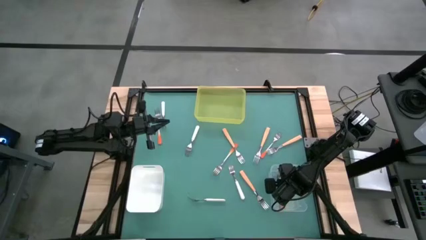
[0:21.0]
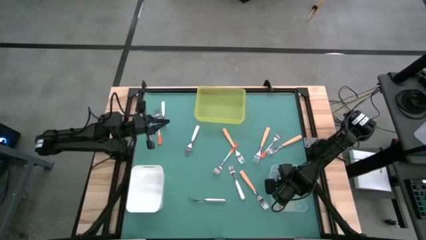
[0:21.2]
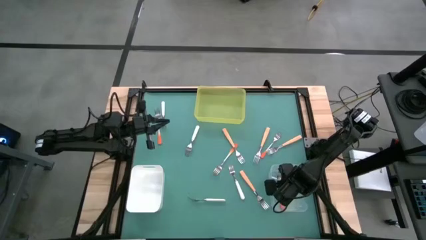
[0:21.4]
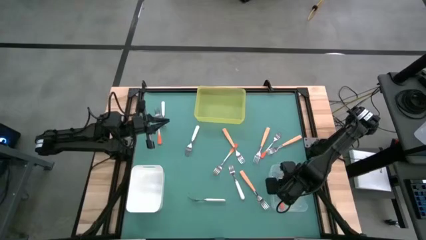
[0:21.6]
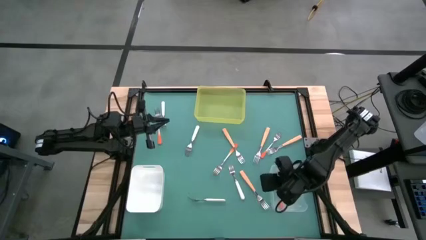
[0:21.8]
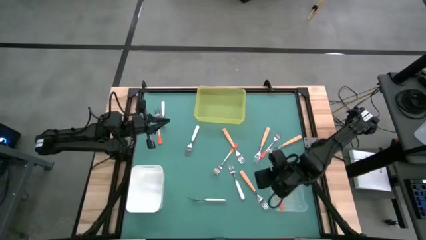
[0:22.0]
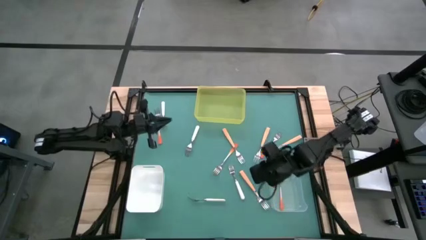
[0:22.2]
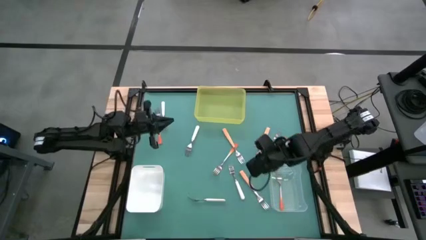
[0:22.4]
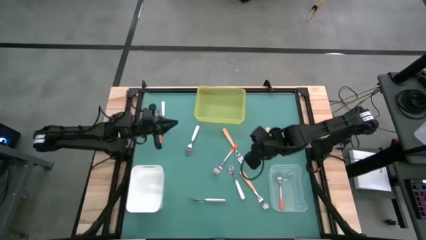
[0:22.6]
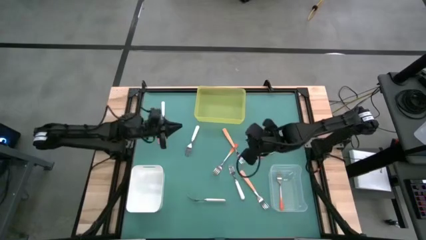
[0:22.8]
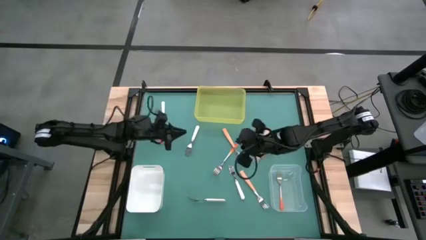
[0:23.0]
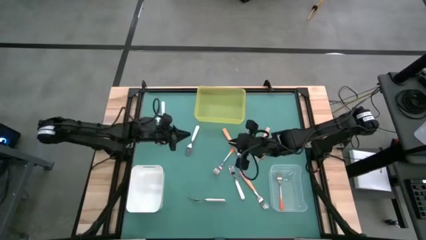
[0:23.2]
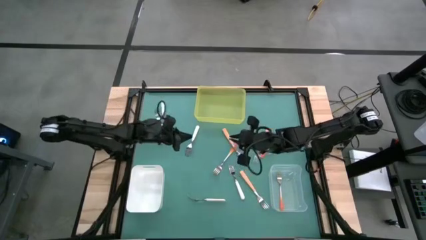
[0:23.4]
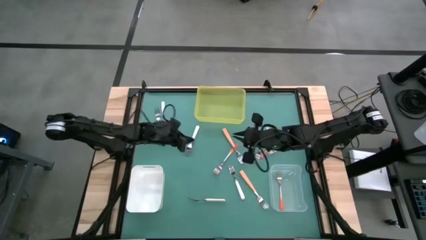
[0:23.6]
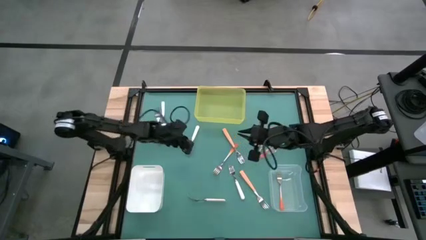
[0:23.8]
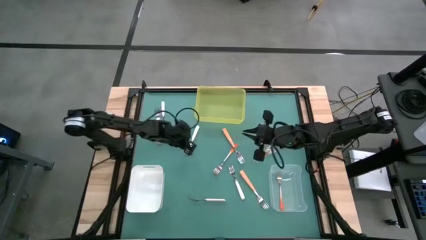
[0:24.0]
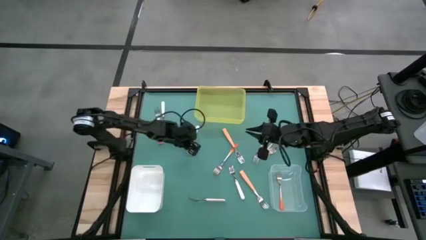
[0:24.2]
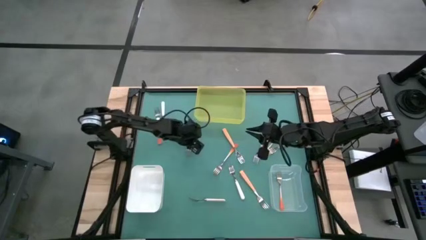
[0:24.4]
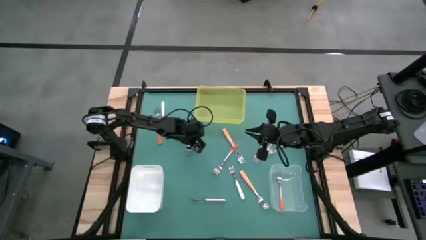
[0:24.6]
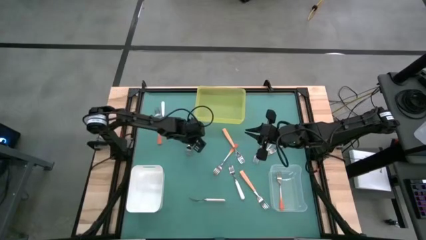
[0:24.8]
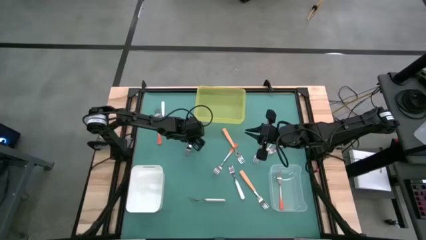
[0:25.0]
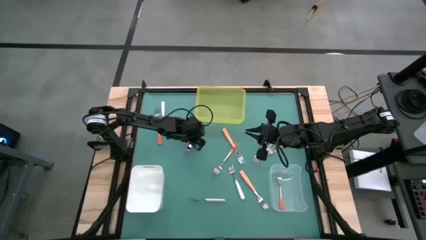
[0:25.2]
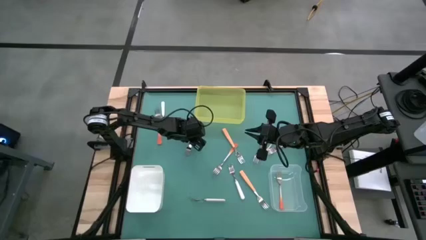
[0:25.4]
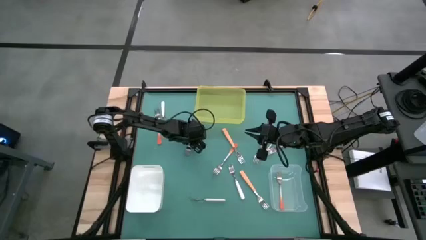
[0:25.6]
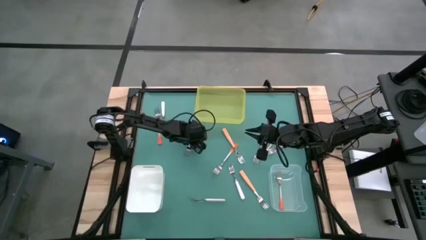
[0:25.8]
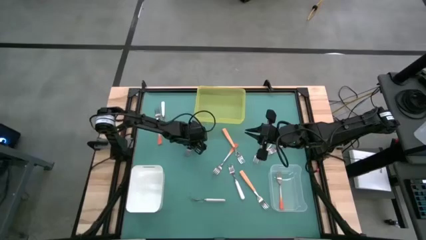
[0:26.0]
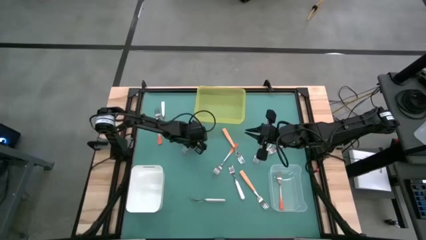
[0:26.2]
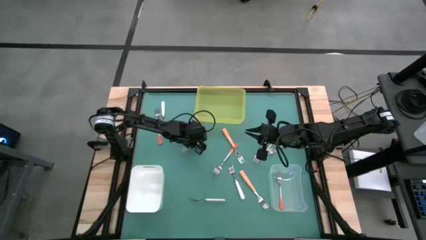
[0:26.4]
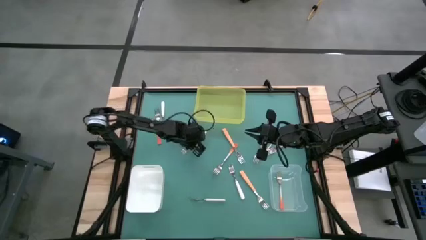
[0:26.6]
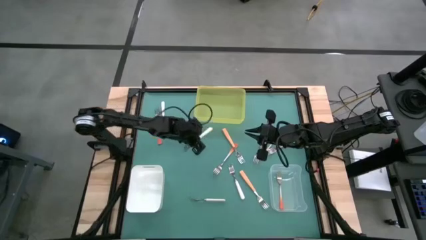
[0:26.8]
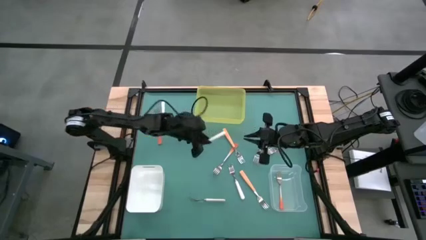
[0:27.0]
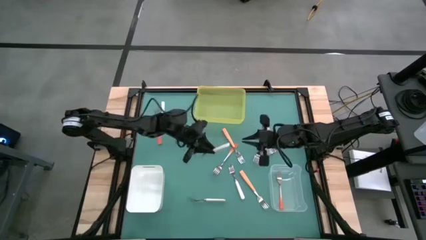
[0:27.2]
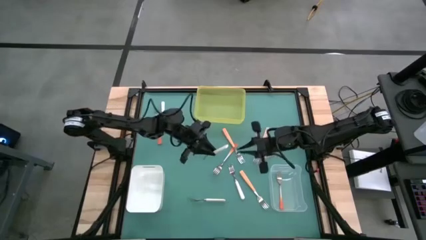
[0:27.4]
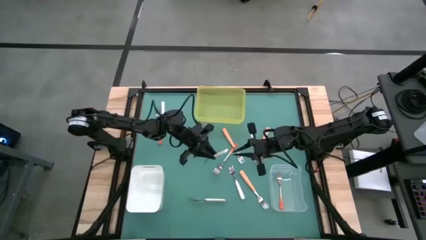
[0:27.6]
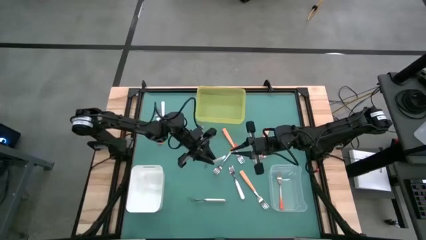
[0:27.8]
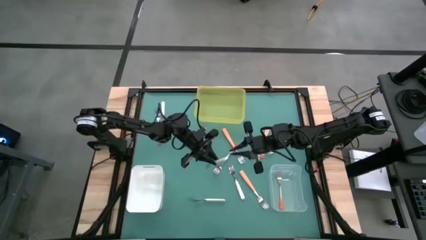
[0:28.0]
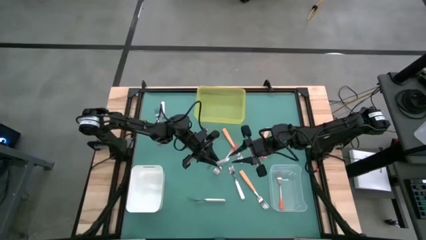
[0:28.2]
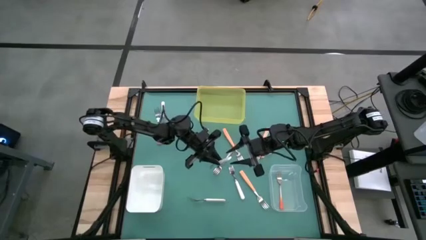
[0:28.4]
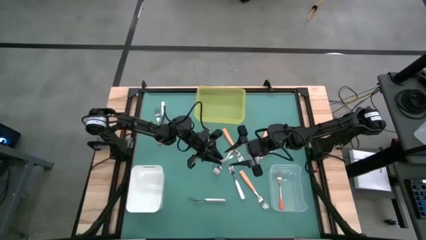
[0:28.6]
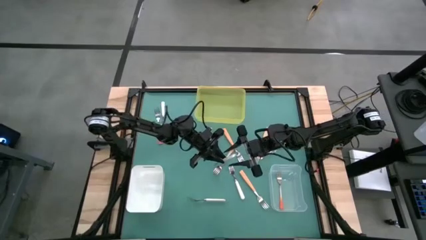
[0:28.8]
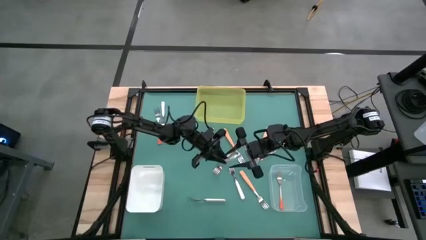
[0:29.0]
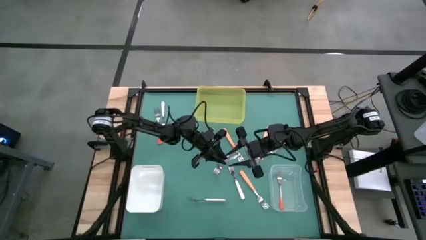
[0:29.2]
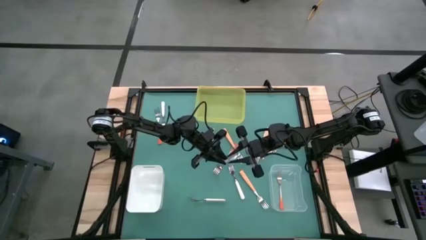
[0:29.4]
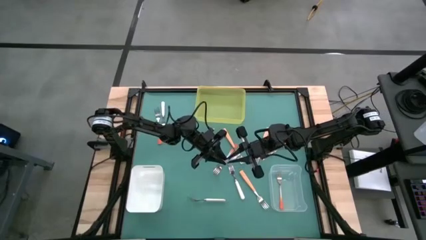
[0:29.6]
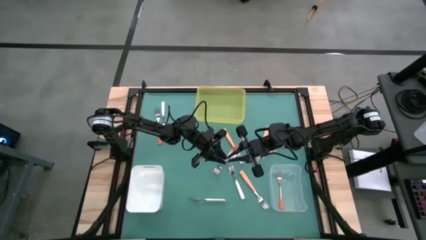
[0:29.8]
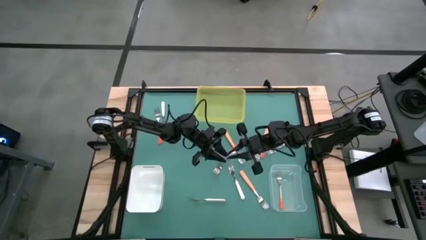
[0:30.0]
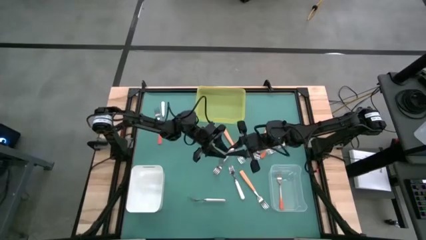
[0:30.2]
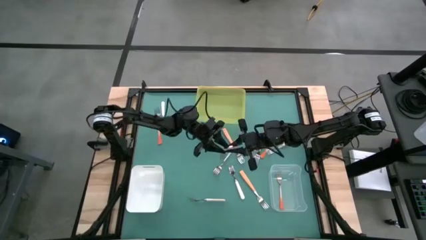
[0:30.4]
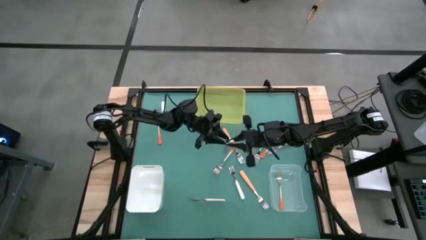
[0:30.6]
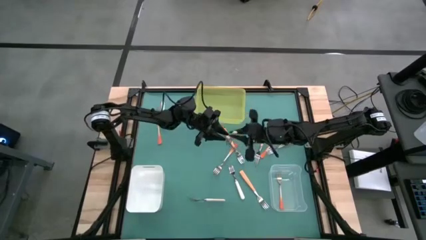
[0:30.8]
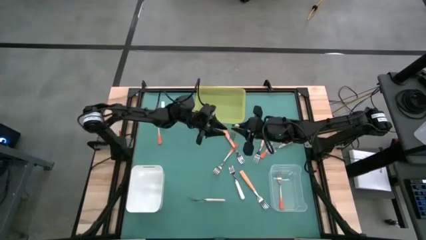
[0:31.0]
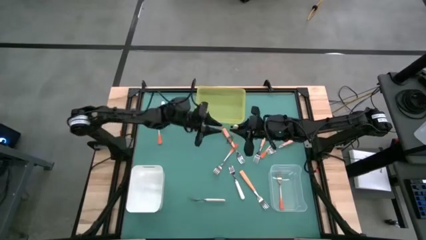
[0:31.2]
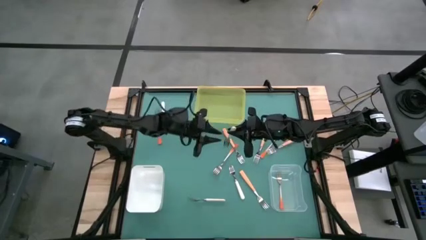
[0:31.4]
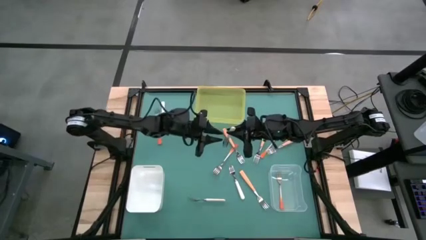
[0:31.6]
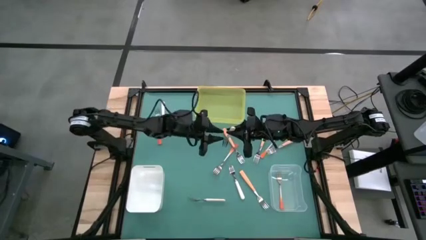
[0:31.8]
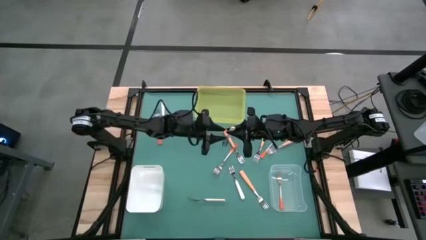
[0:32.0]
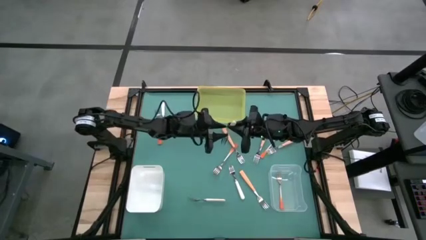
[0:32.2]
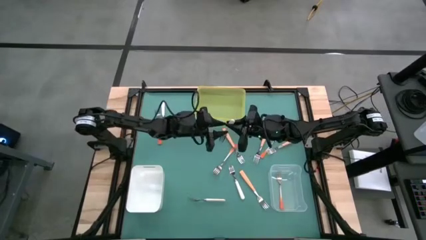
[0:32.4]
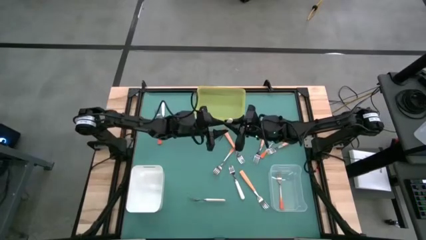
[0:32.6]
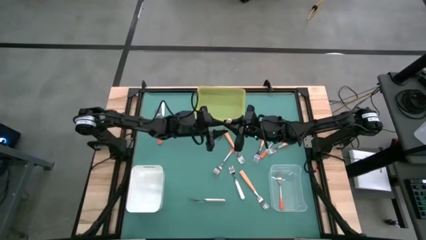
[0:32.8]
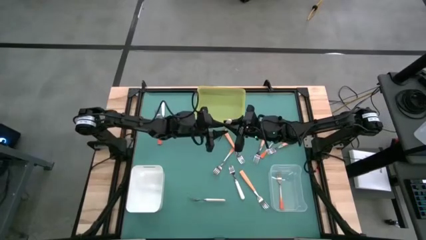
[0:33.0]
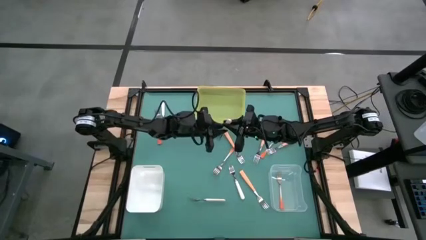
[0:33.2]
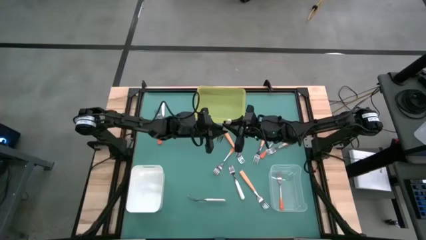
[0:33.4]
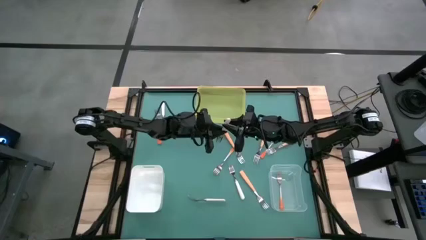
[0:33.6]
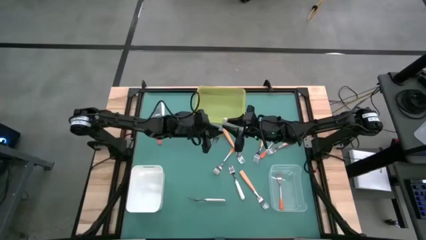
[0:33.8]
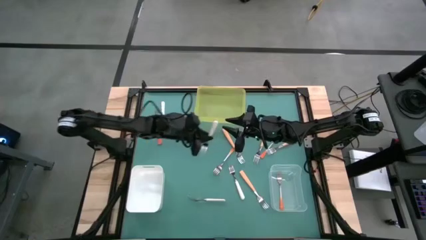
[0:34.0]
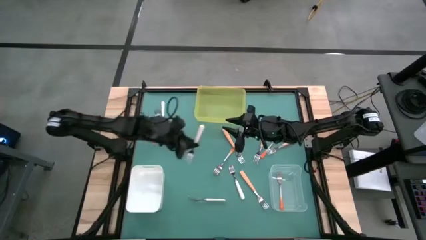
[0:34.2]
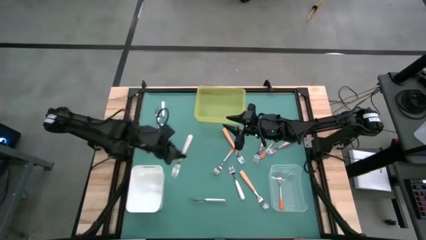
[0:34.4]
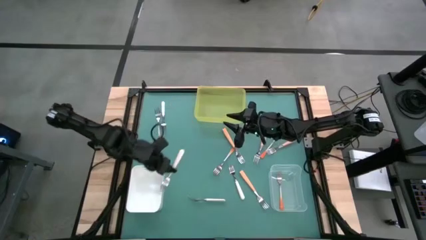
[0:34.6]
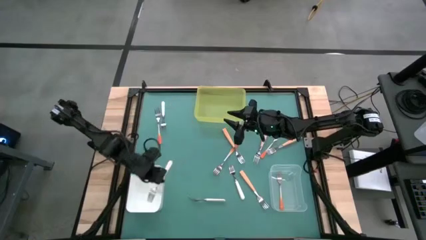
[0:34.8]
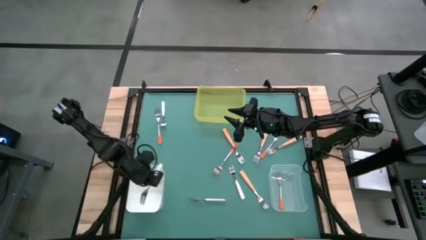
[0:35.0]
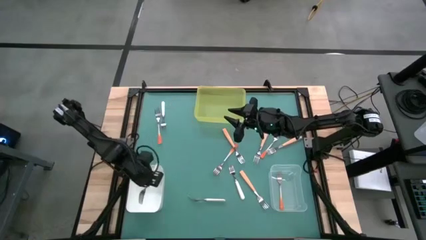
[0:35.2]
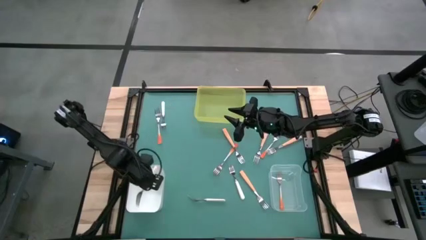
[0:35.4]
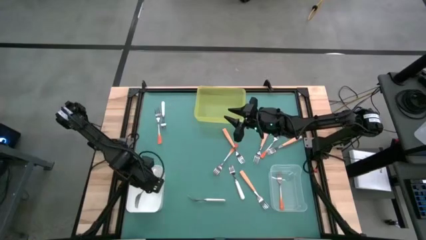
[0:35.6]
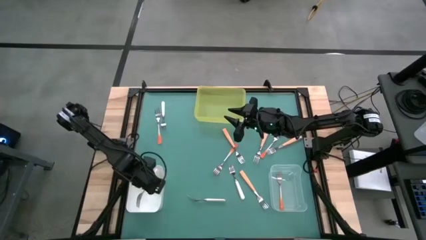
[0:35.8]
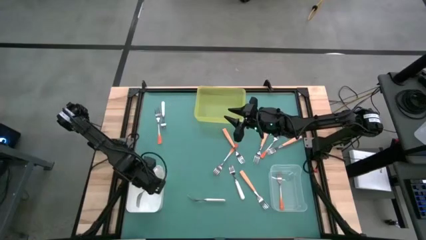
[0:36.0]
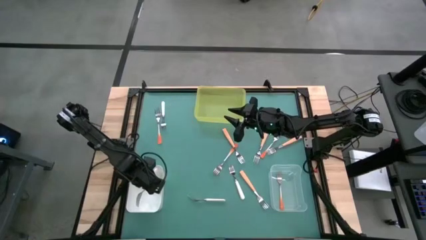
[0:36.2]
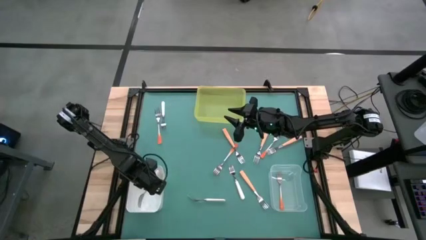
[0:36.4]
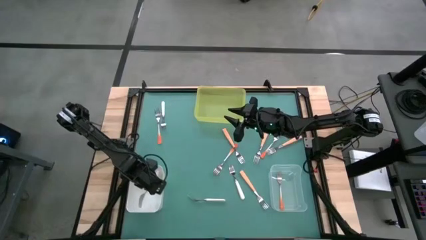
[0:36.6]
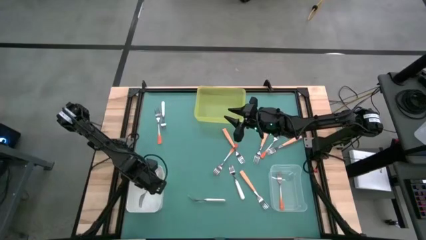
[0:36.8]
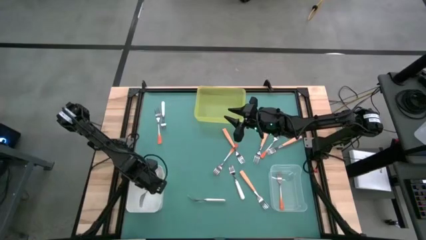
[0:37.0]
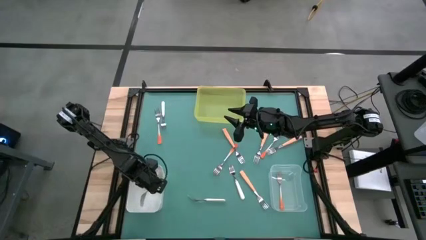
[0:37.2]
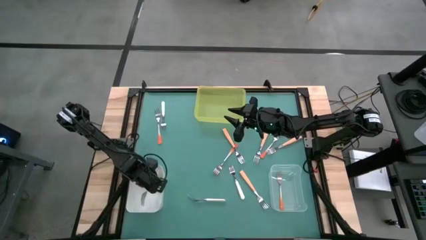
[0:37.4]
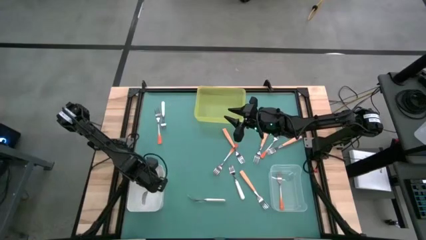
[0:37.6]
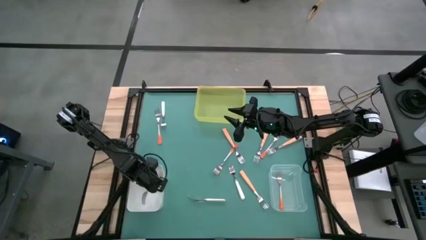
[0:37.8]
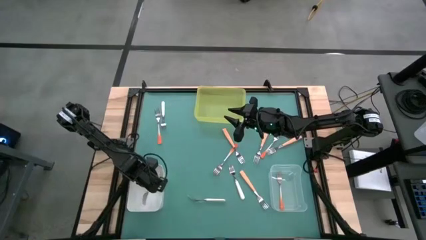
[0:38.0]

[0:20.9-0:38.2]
Task: Sort silverware by color (type)
Put the white fork into the white bin
